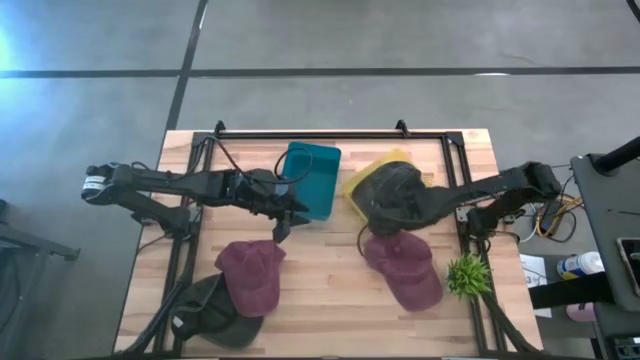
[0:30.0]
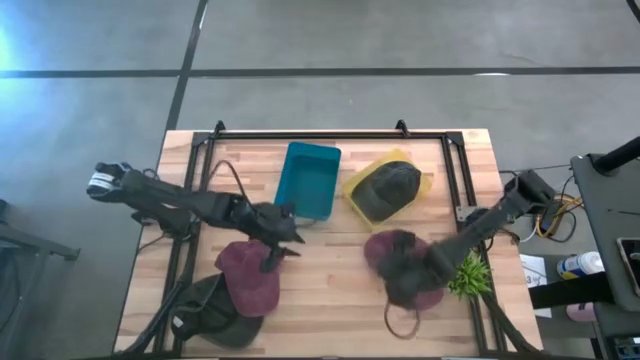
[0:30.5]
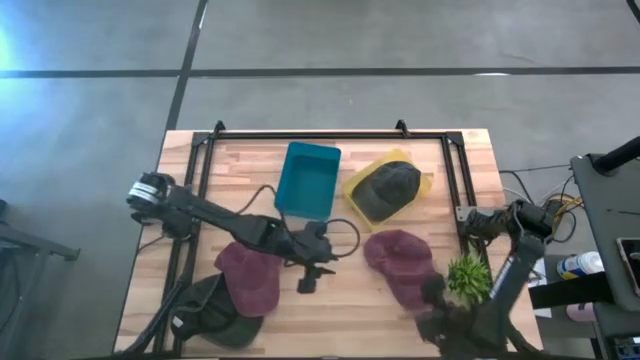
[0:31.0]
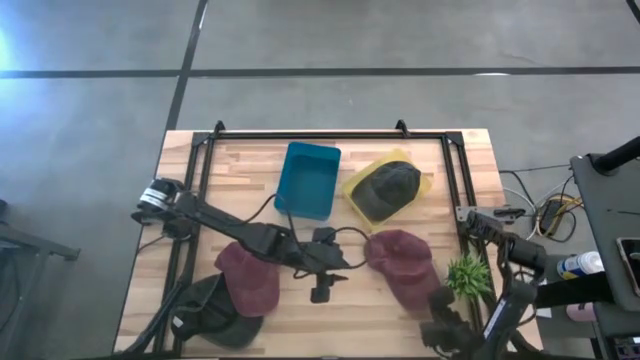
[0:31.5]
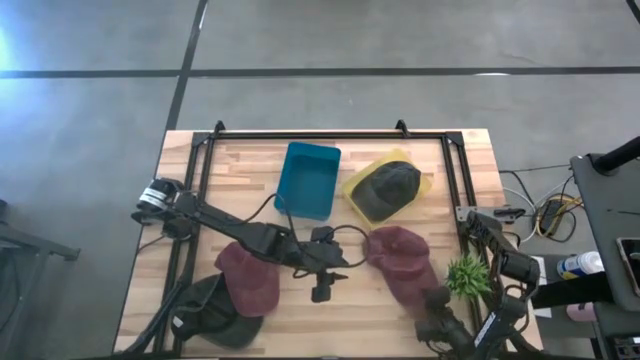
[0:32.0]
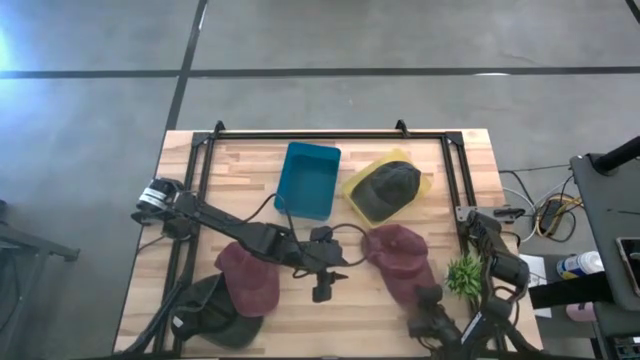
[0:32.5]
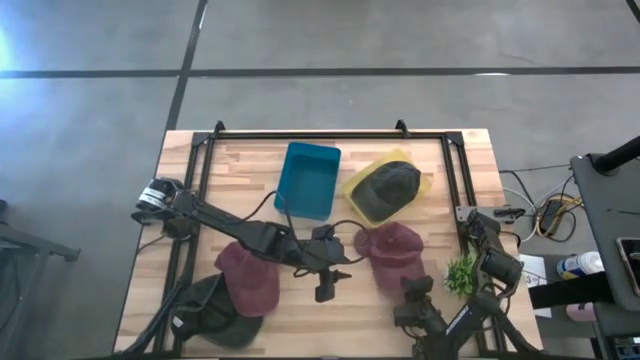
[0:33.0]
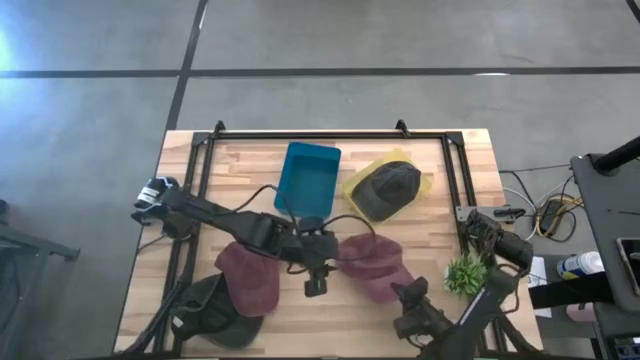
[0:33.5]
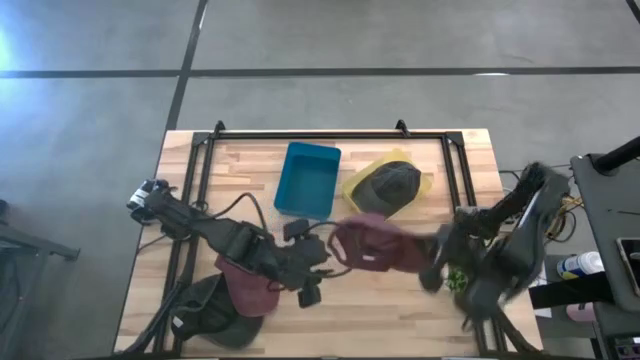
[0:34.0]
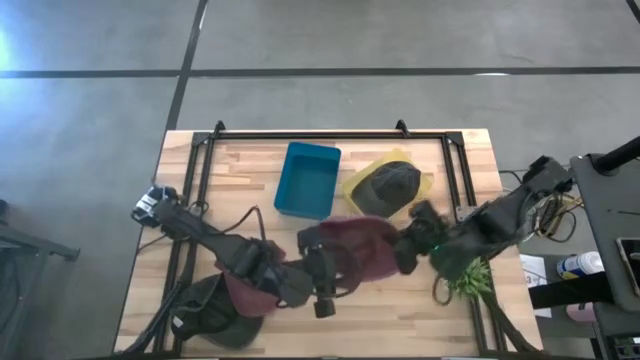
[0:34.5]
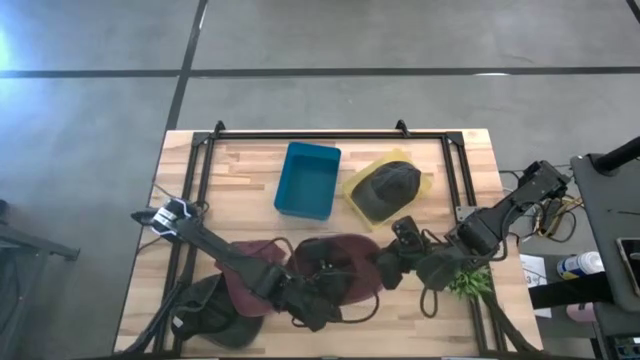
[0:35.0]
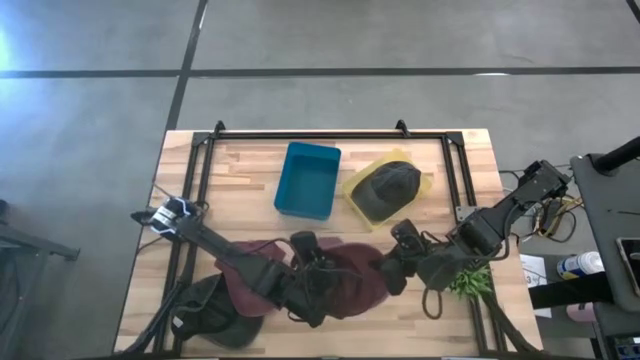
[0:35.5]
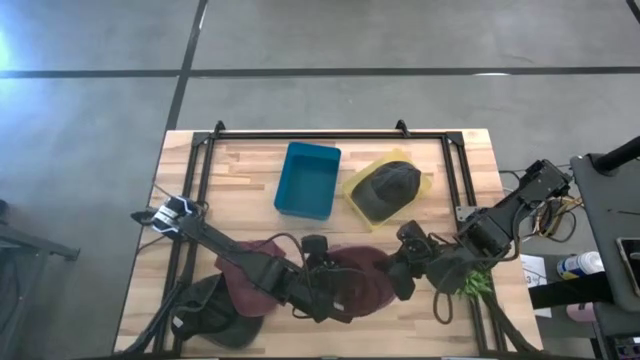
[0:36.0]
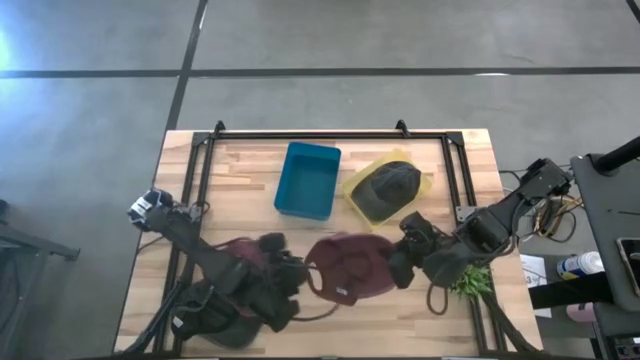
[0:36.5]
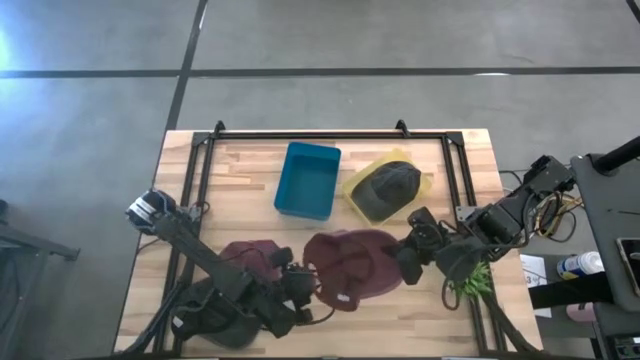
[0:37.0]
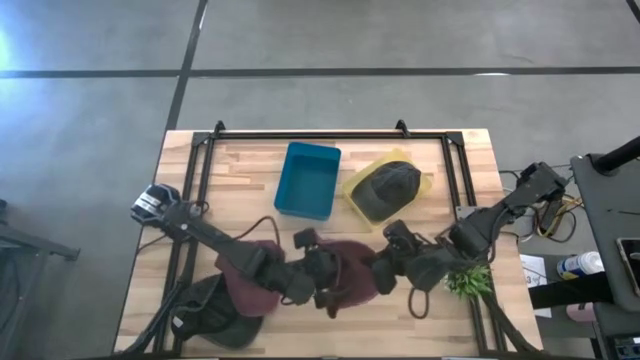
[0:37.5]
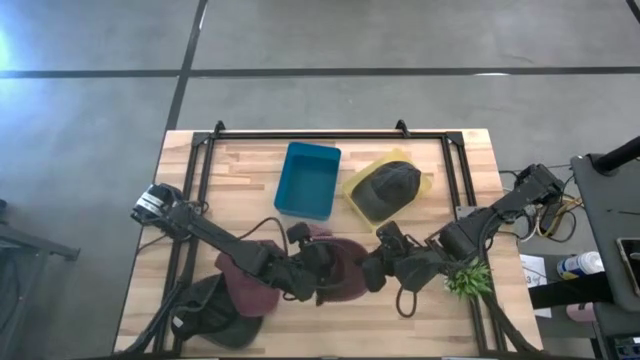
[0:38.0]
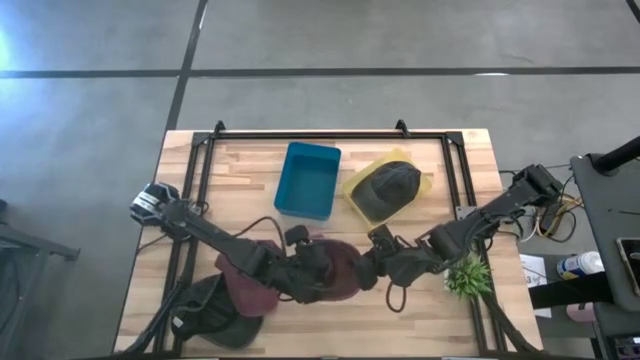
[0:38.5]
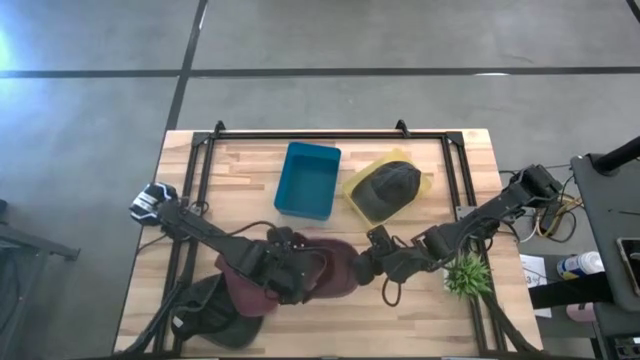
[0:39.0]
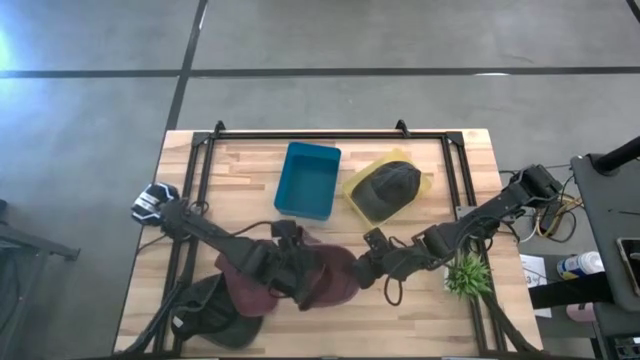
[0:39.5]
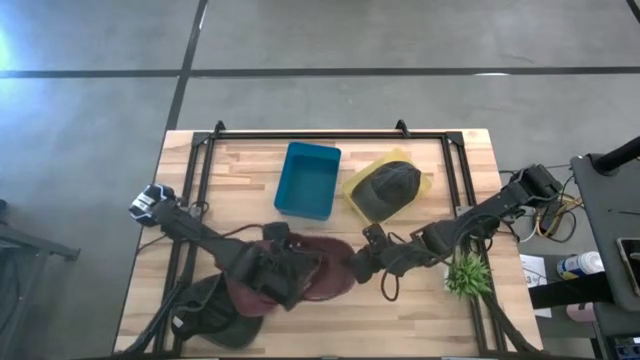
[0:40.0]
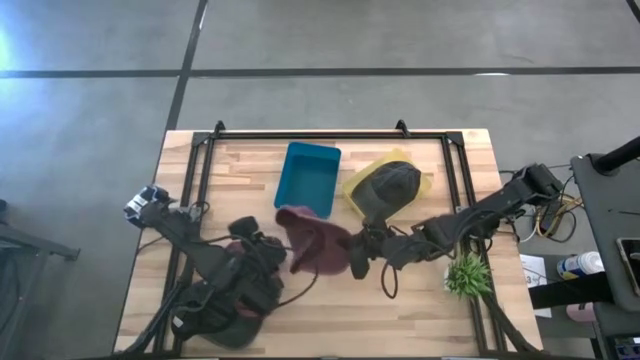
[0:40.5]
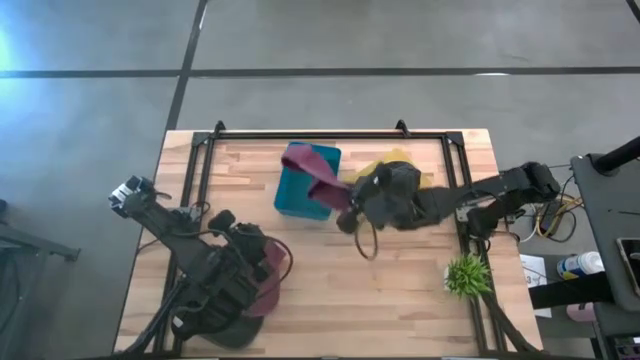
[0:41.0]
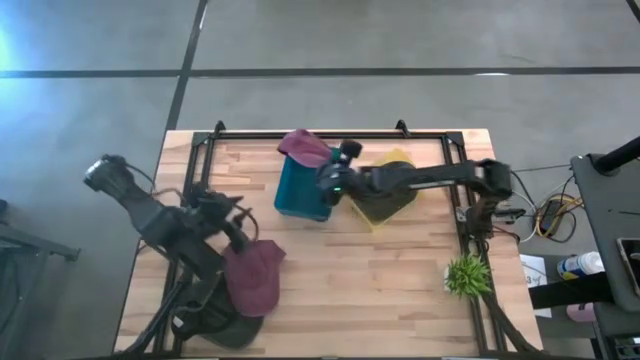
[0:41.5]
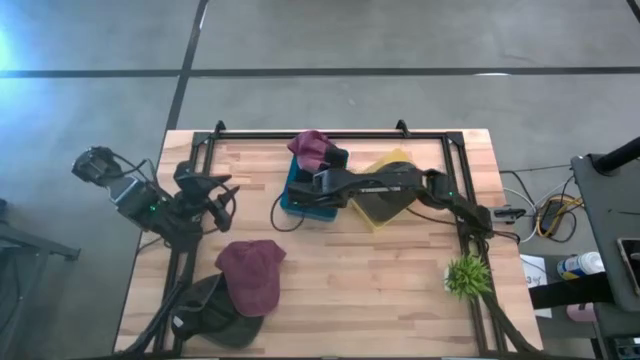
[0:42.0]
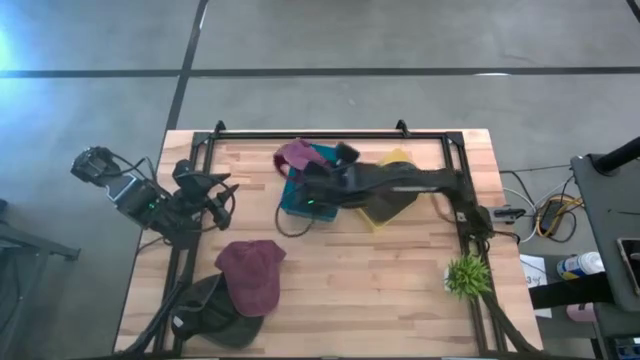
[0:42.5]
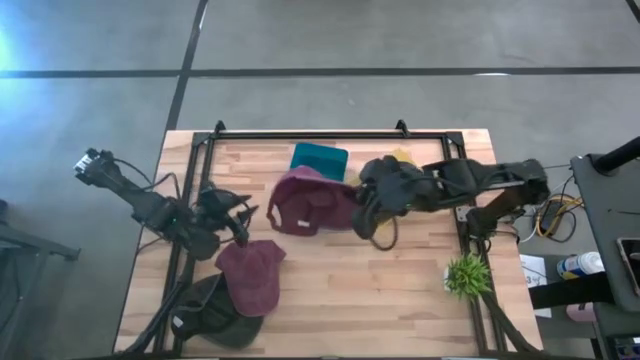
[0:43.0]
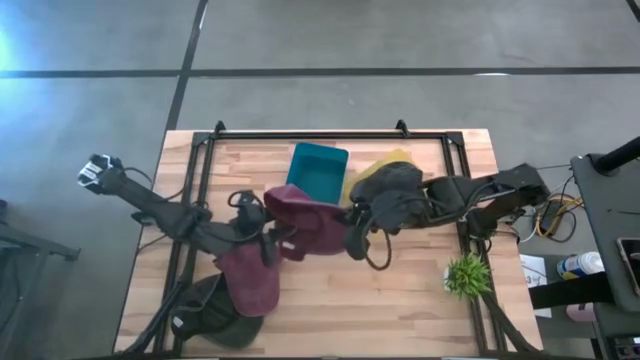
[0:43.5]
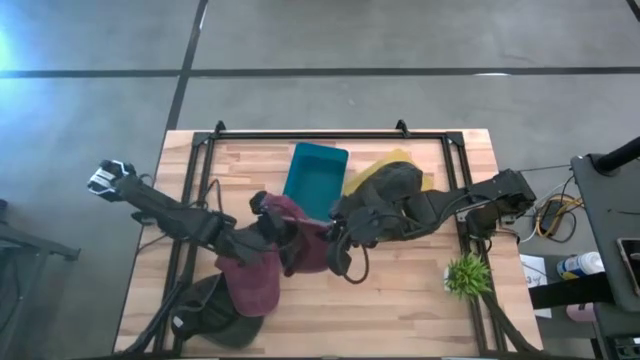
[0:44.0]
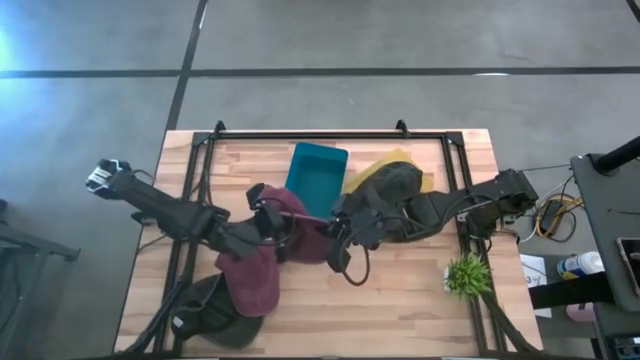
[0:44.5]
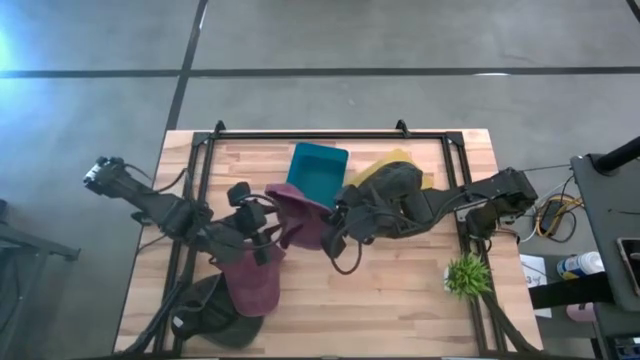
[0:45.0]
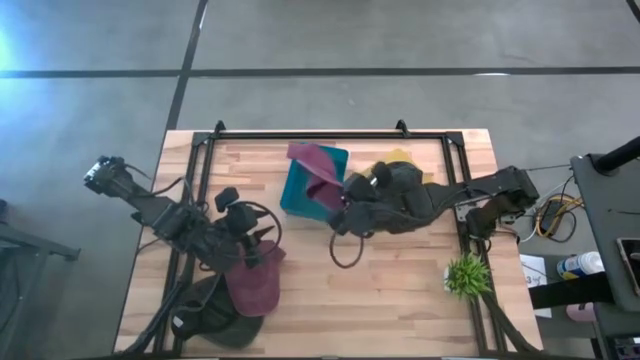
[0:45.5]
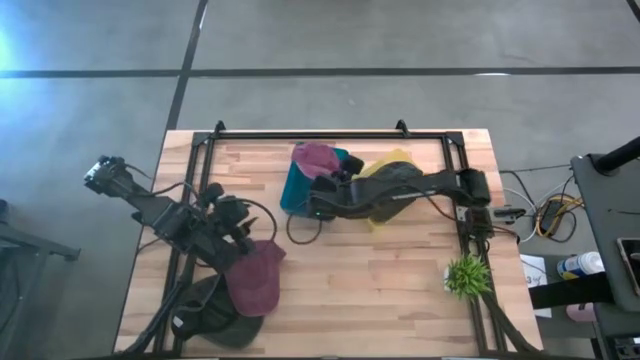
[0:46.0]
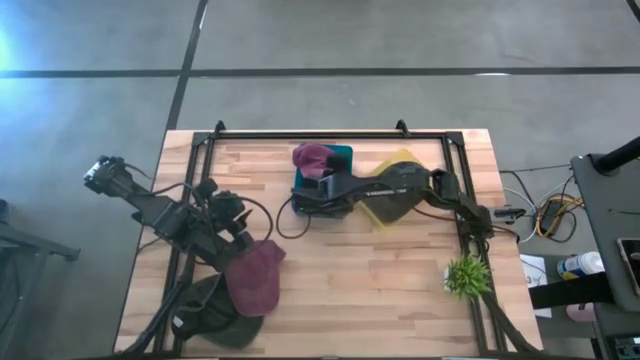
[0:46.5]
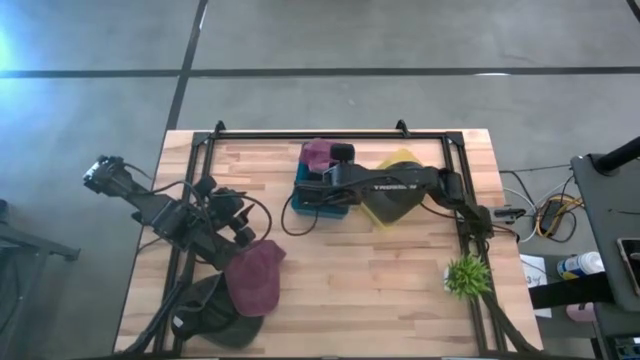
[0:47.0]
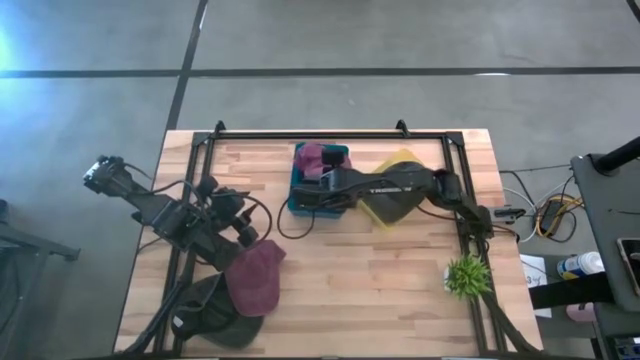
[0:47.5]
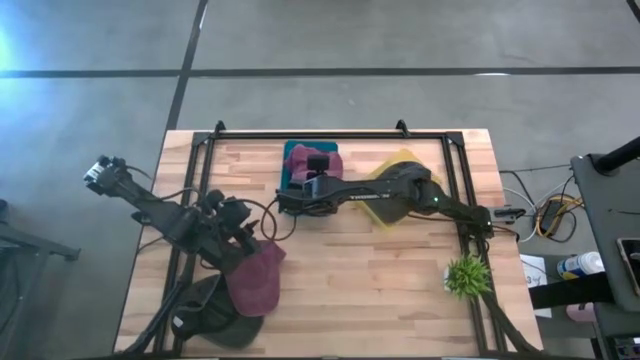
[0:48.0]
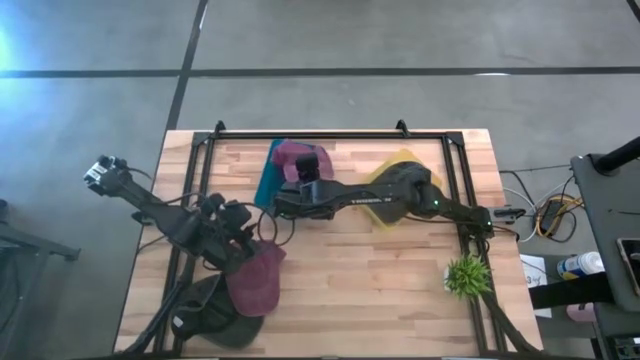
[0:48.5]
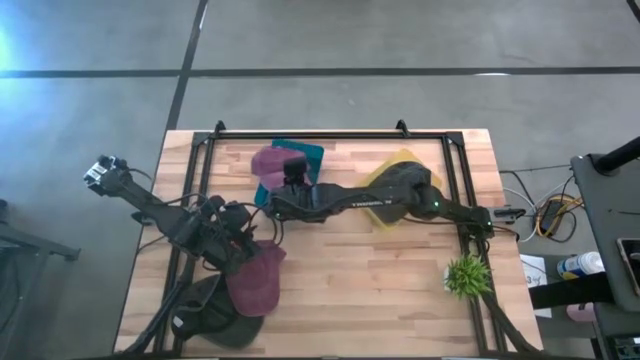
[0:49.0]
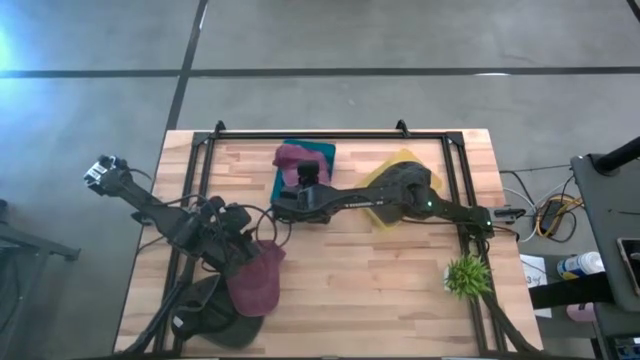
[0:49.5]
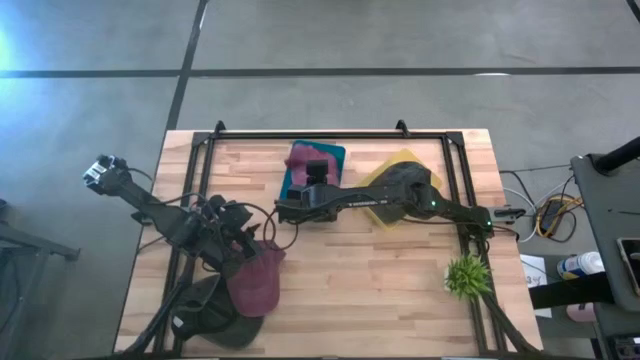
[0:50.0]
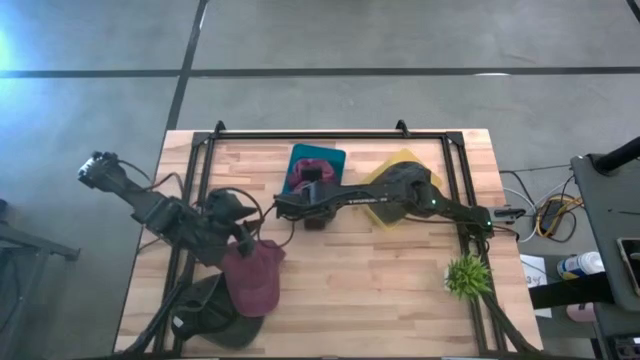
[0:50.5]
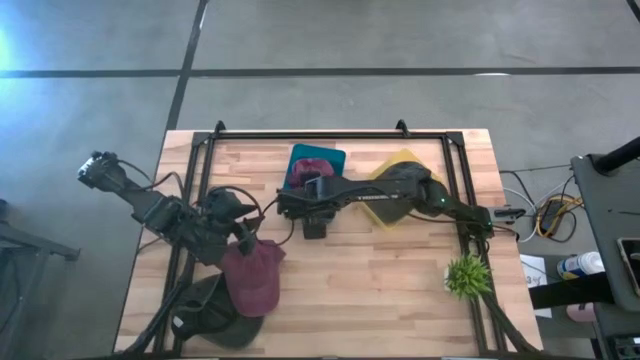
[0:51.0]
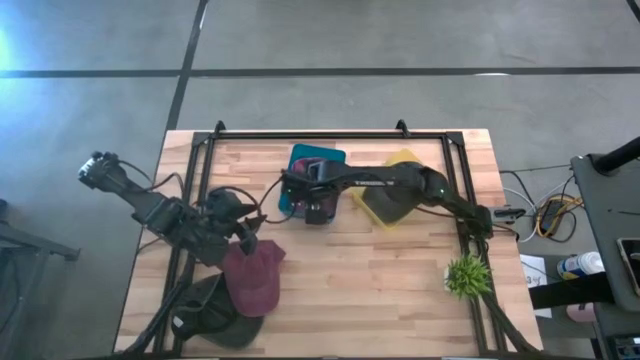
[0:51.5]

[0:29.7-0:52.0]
Task: Pick & Place hat
Put the right red cap into the blue bin
